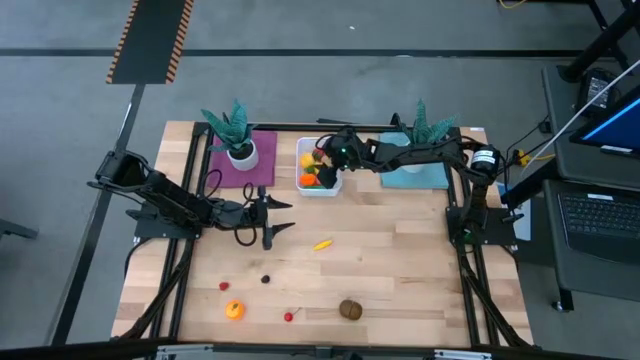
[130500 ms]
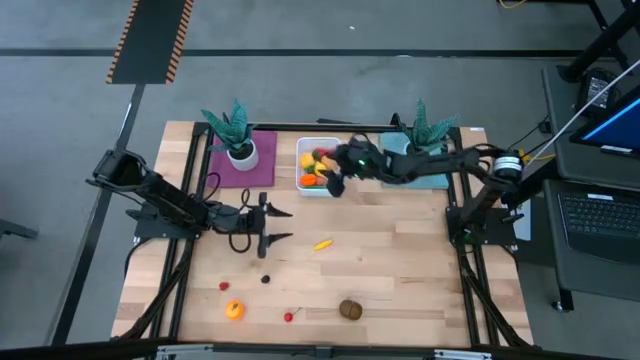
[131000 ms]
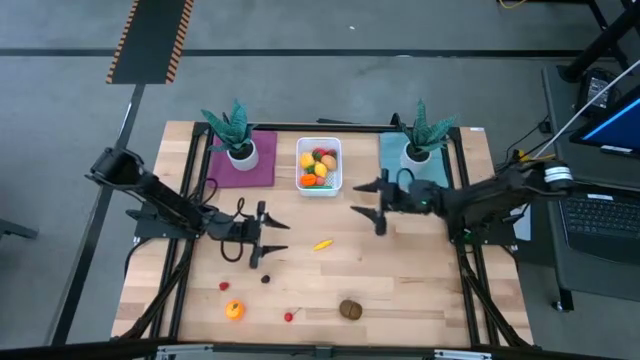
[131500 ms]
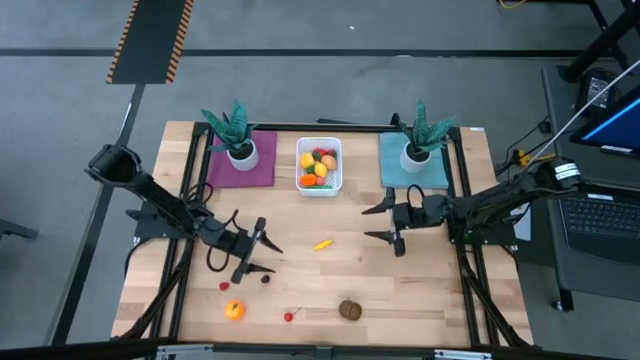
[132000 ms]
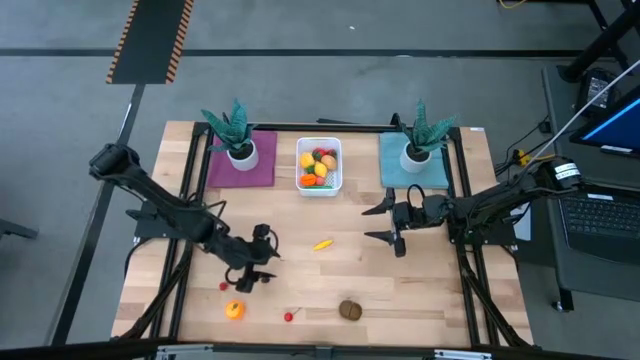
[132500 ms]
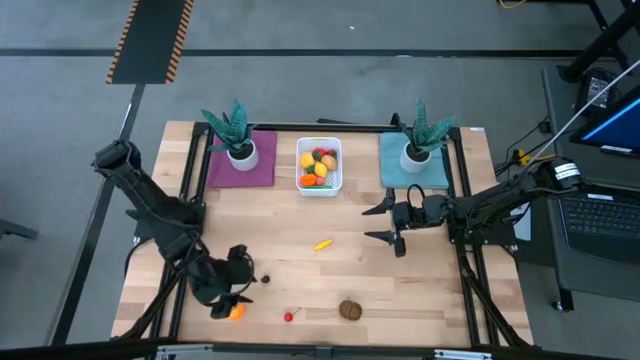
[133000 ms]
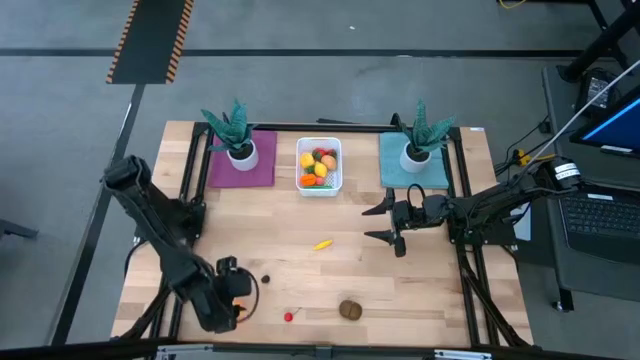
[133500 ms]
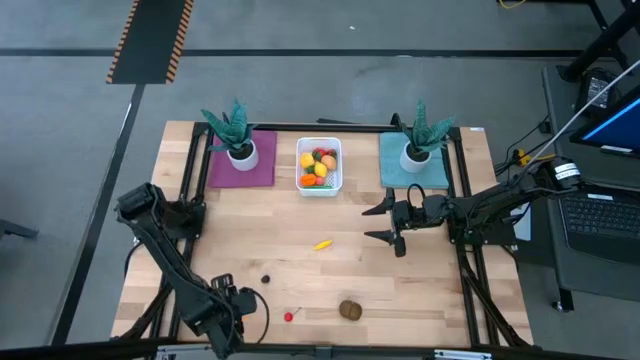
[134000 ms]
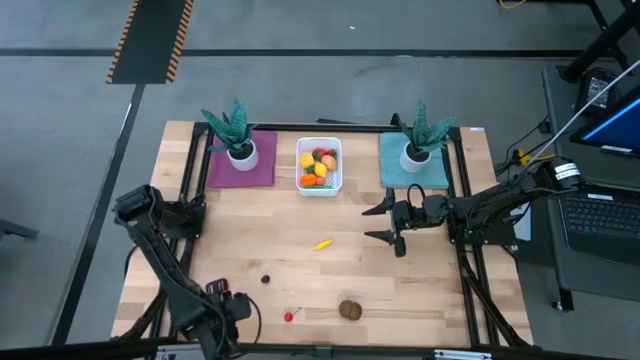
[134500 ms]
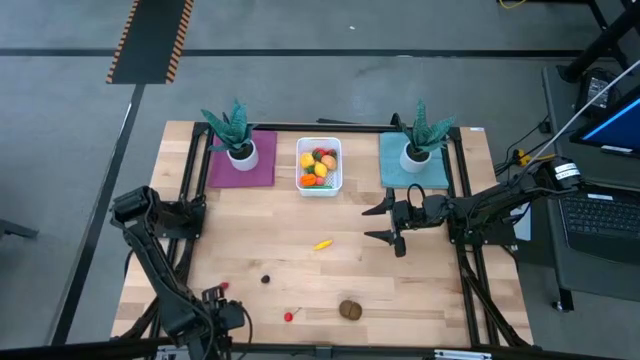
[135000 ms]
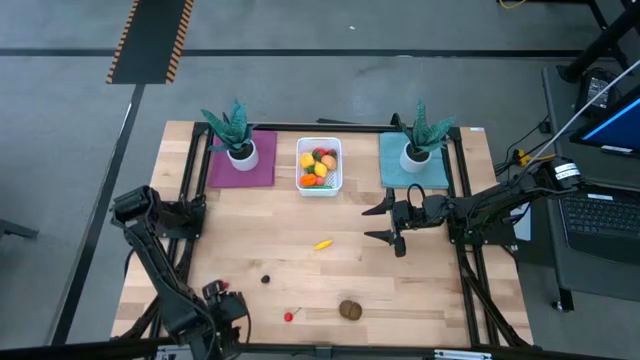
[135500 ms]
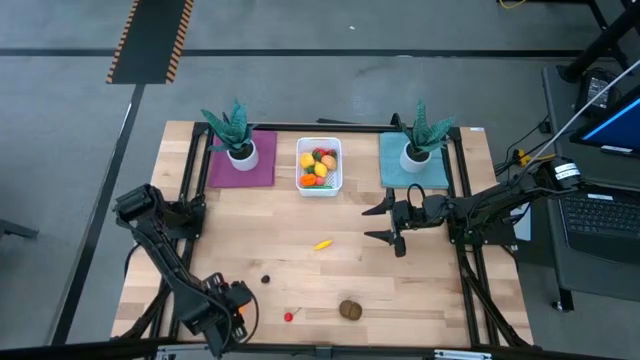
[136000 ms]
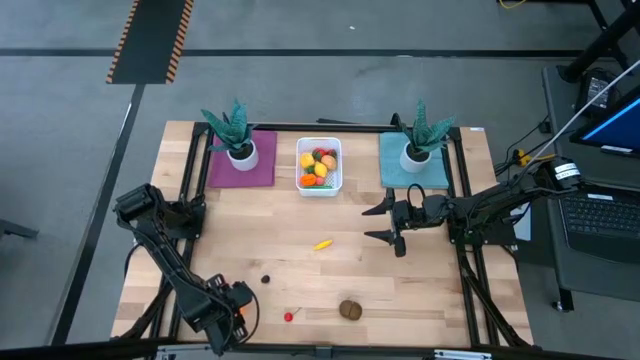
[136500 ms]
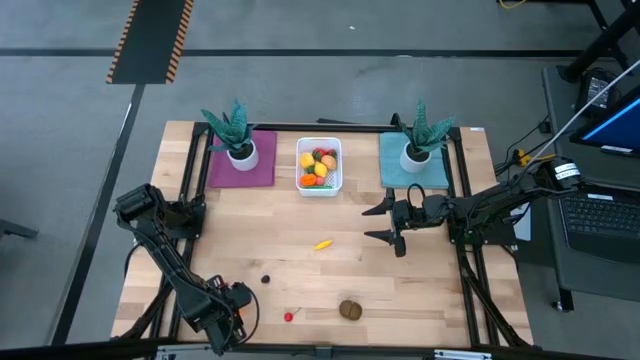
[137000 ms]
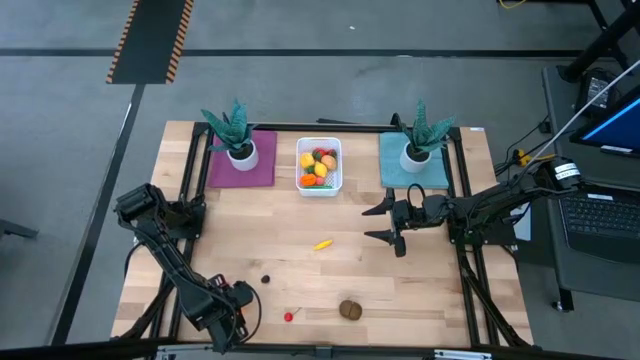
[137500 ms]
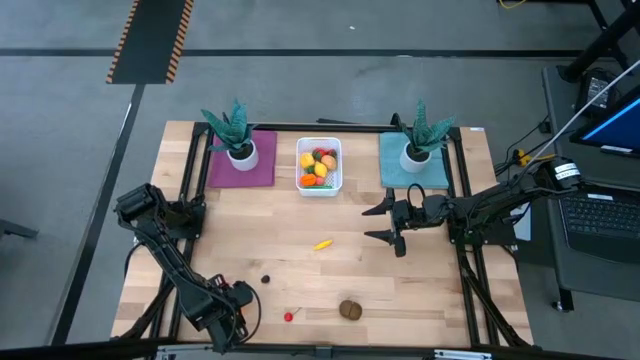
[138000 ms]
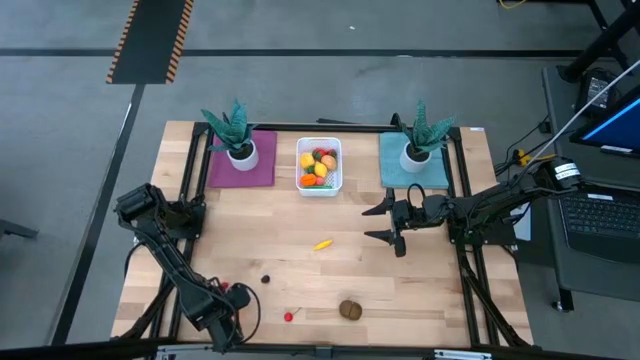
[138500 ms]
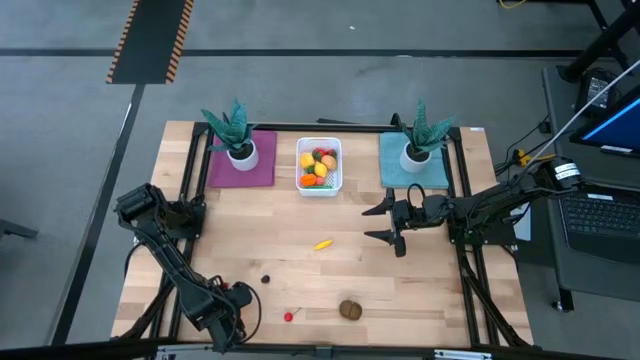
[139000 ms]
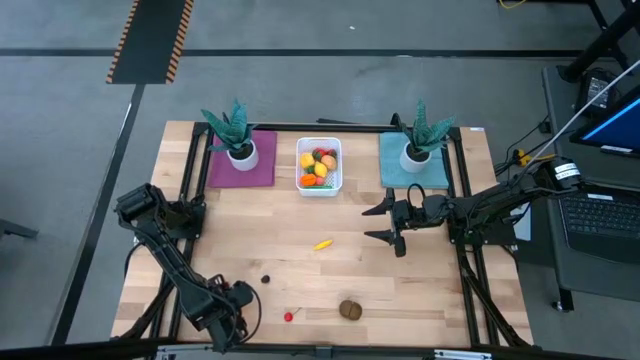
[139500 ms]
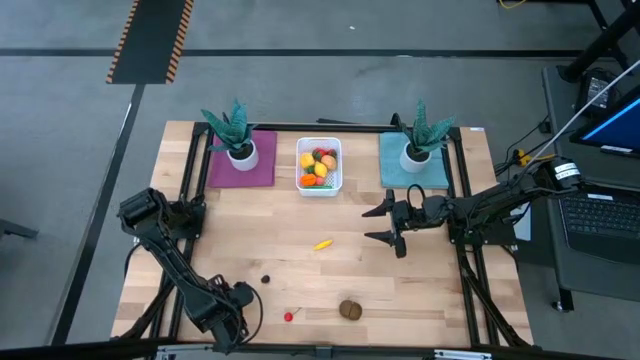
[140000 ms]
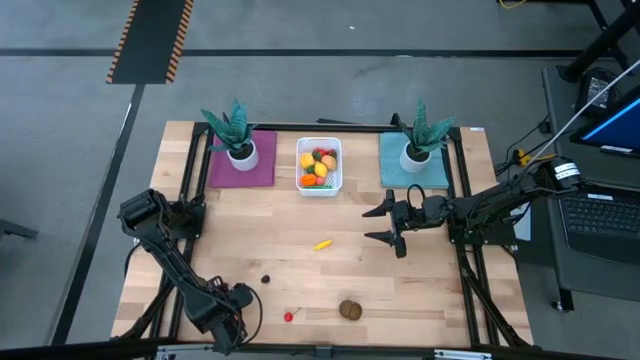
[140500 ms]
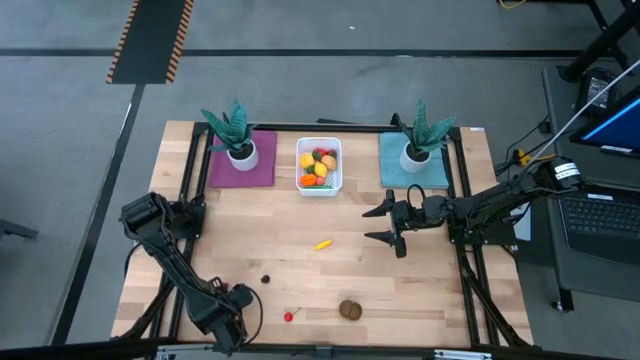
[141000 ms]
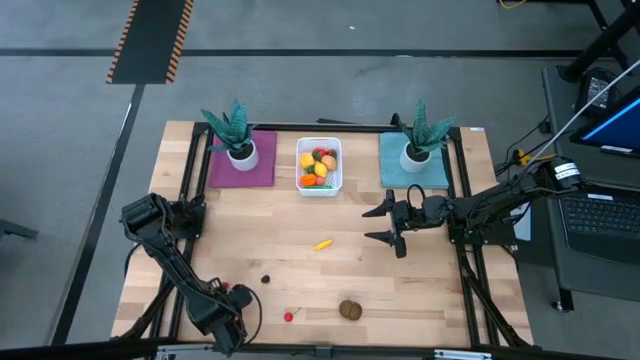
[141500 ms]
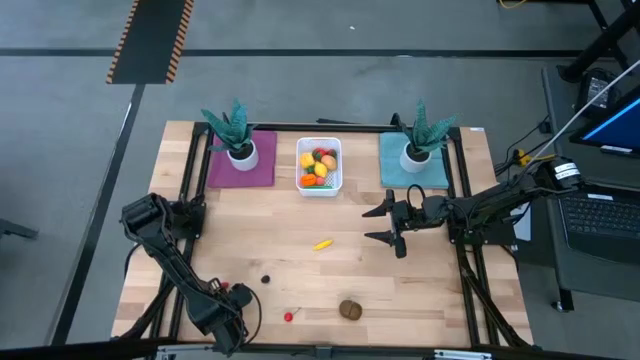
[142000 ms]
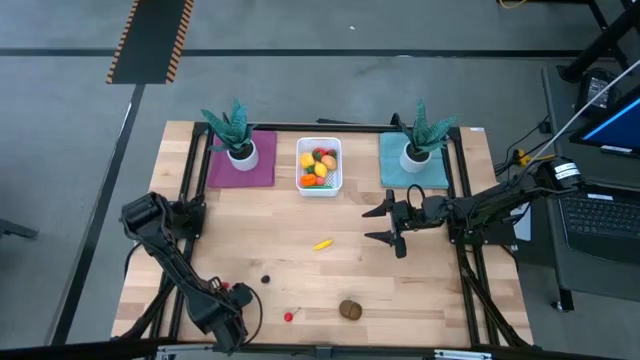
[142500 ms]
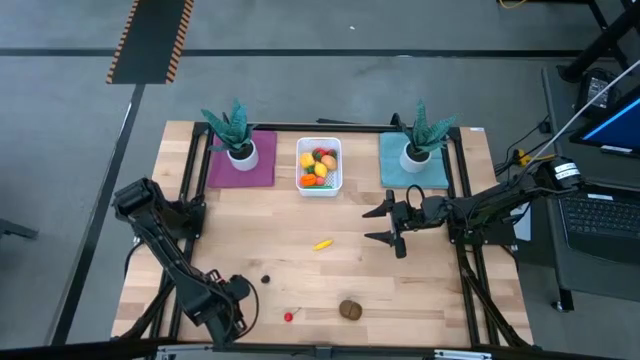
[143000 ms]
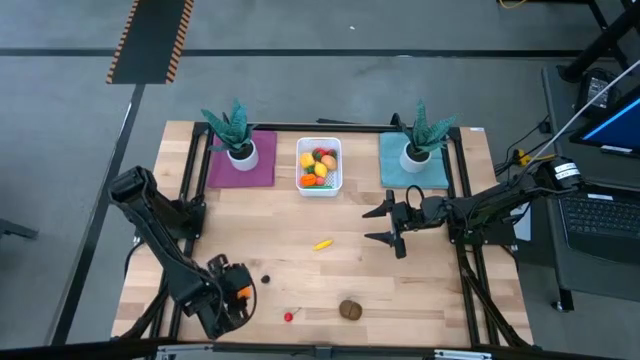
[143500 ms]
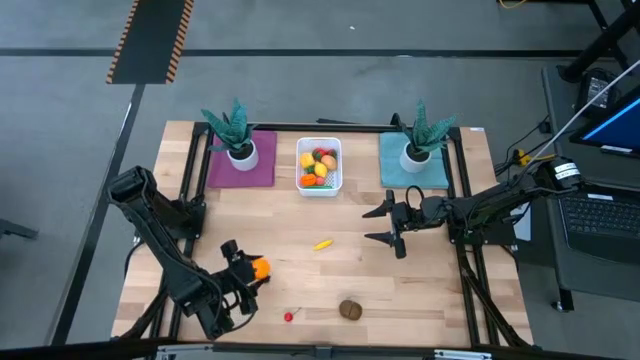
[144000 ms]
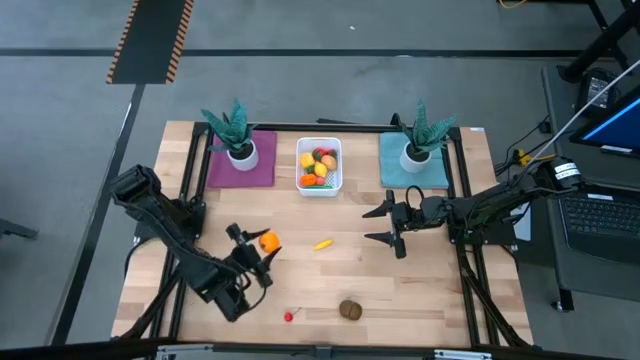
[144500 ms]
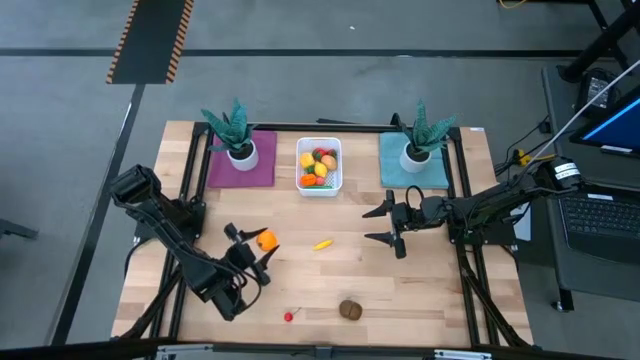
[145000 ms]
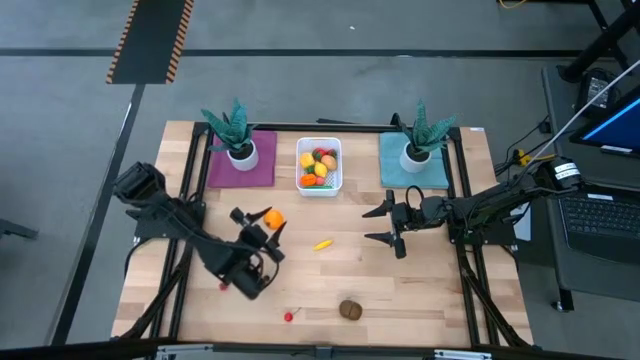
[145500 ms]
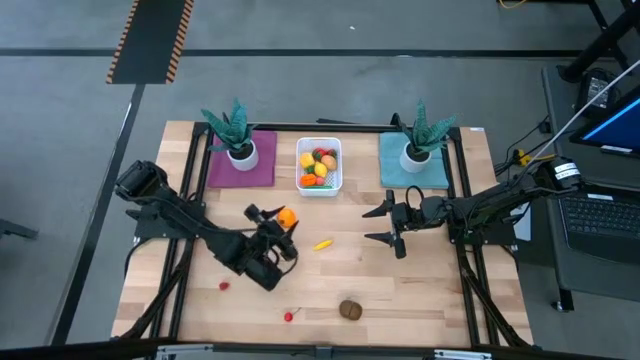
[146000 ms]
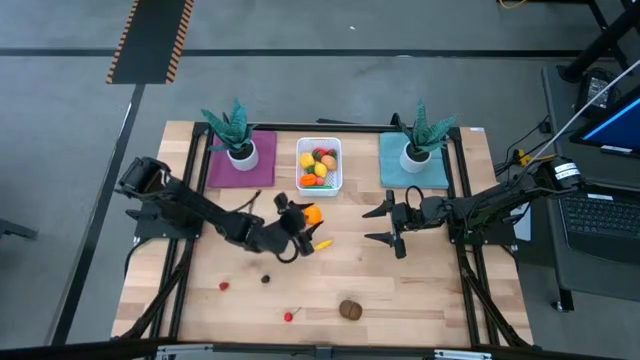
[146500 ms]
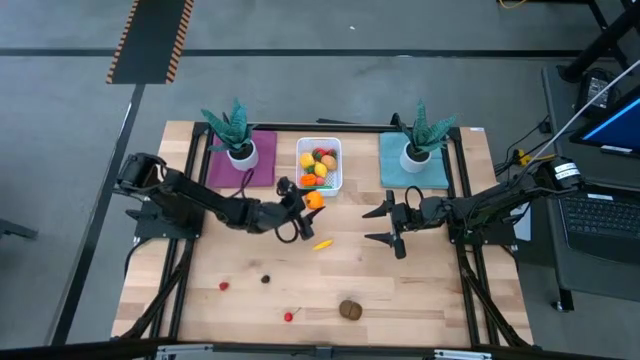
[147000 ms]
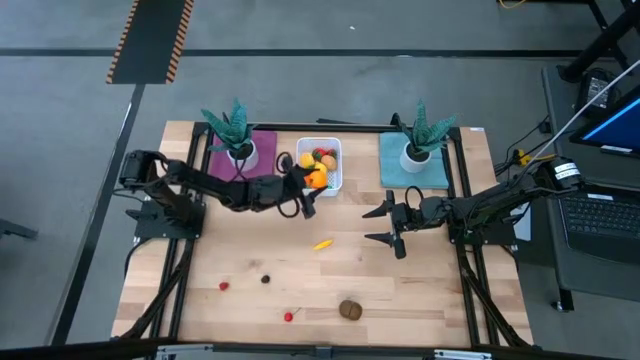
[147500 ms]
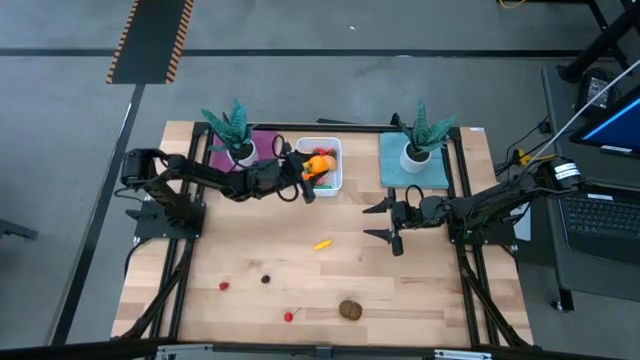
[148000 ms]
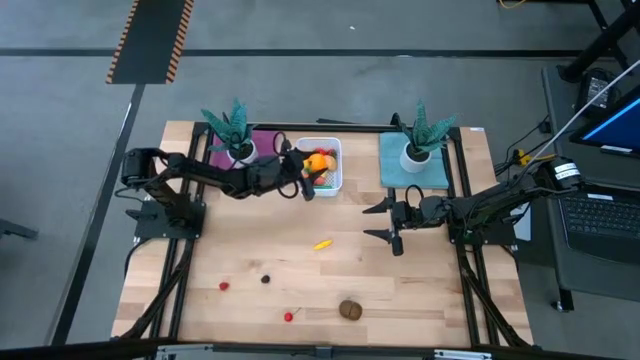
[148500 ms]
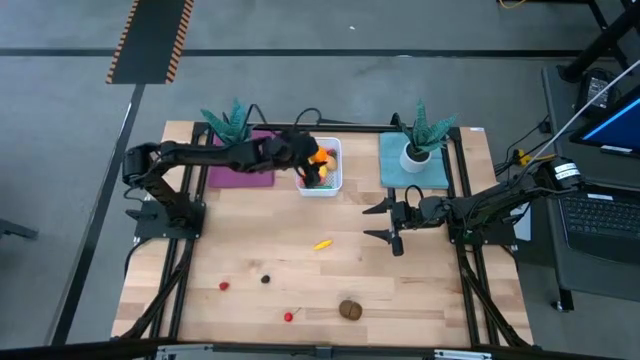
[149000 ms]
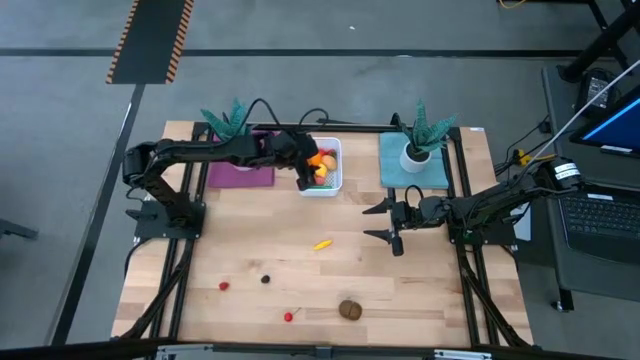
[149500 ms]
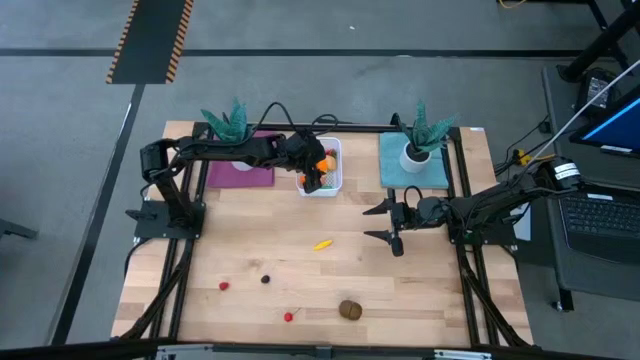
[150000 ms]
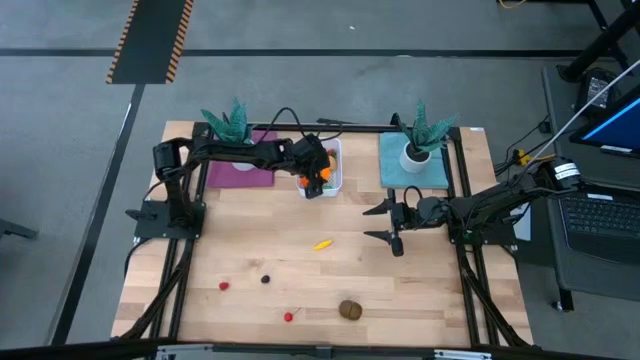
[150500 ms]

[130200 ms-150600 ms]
Task: Pick and placing Produce into tupperware
Put the orange into the white bin
